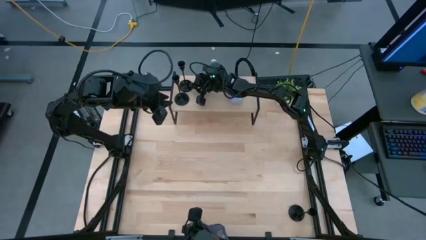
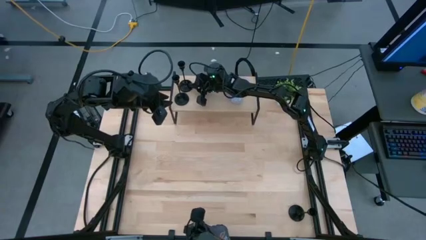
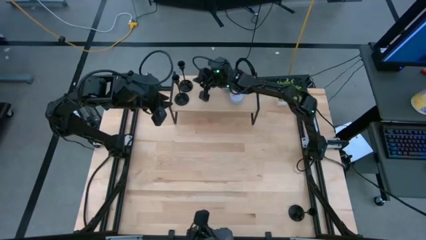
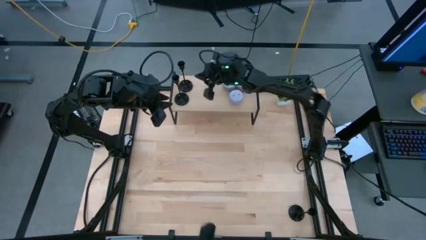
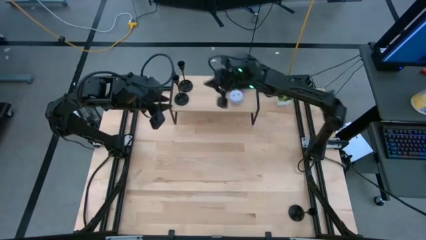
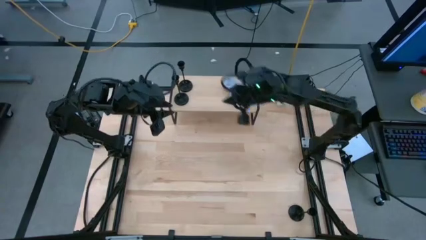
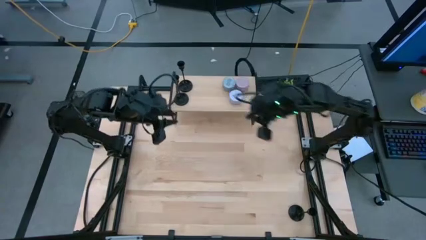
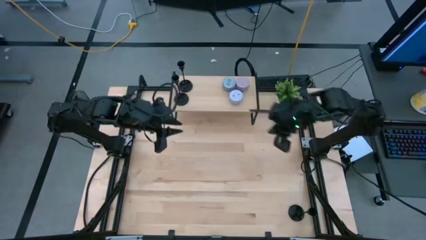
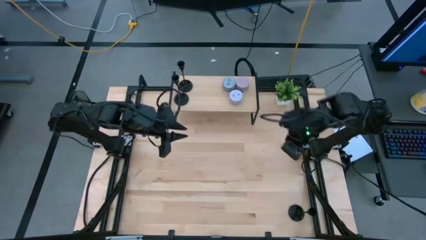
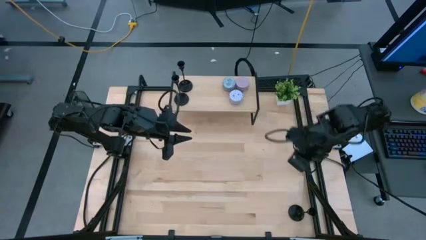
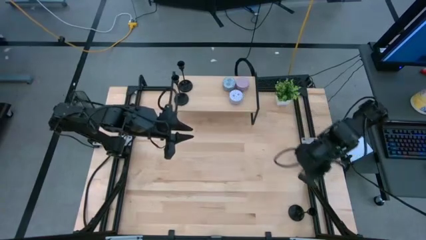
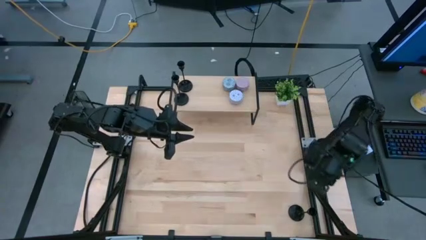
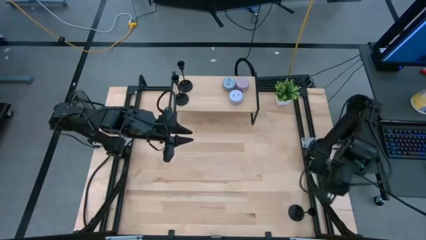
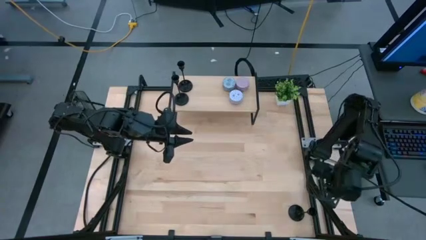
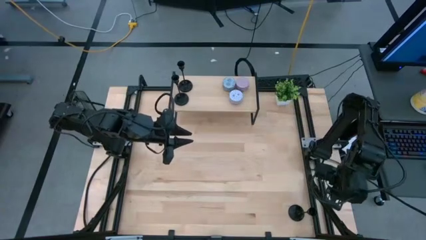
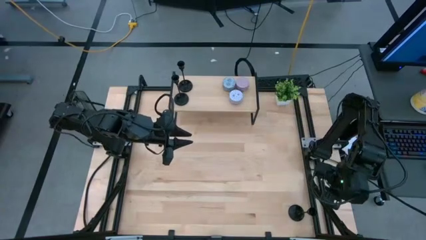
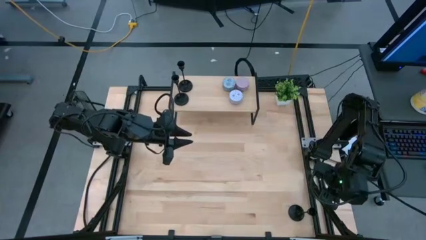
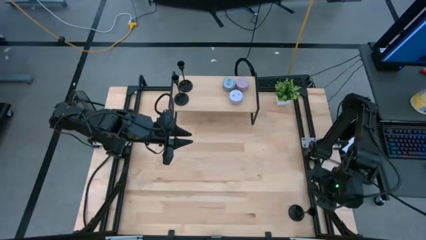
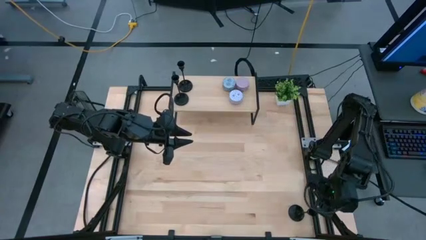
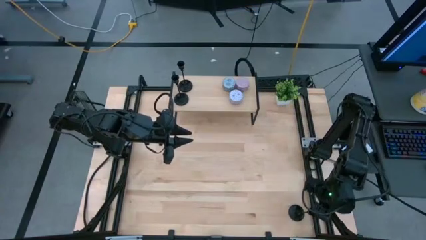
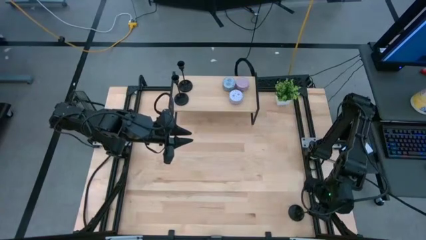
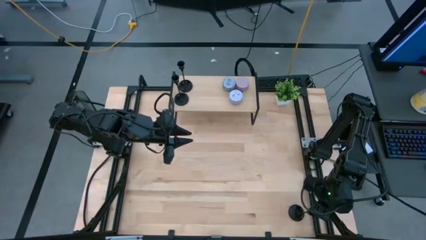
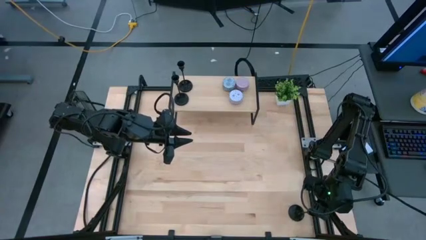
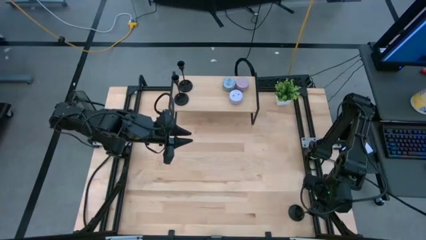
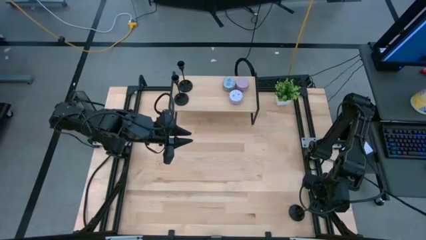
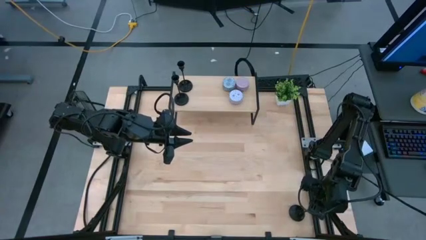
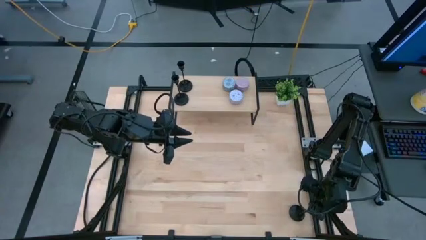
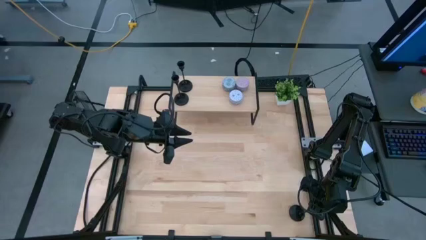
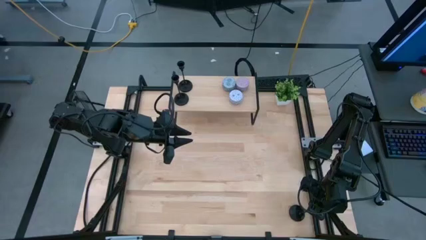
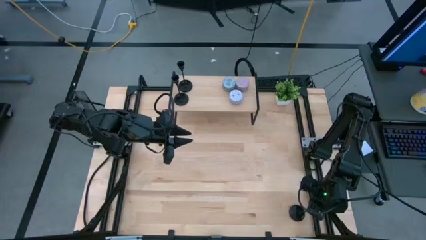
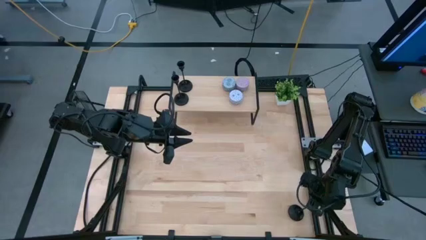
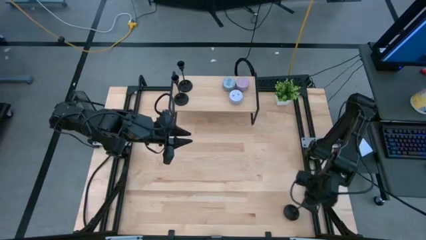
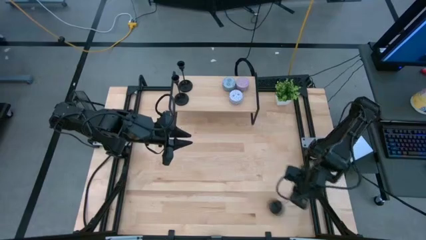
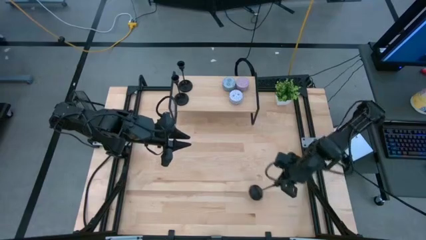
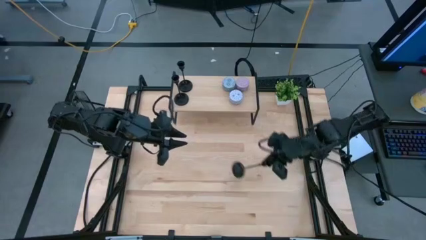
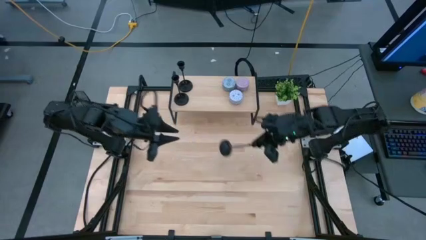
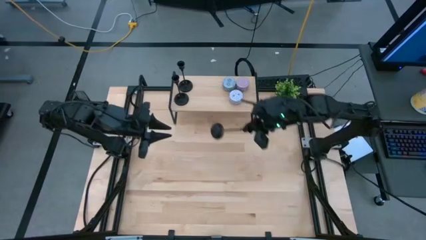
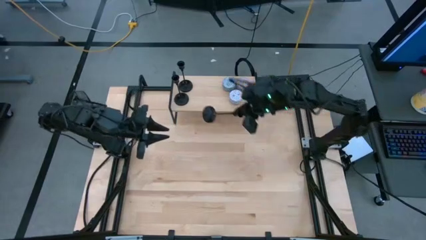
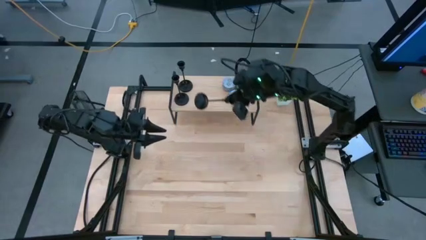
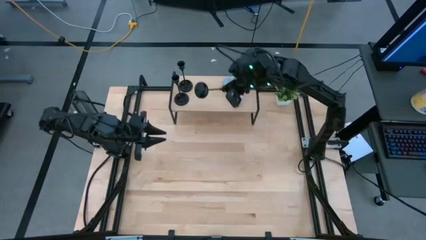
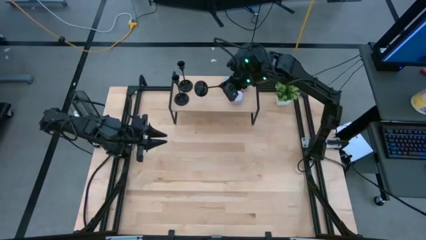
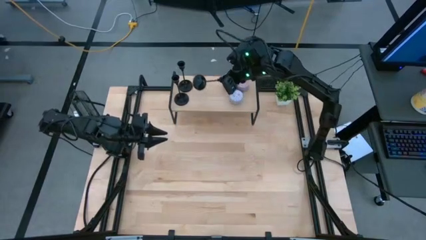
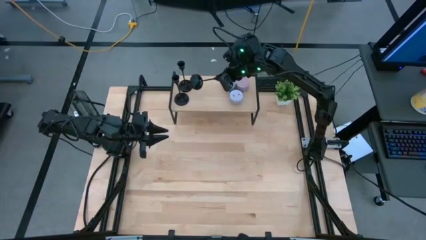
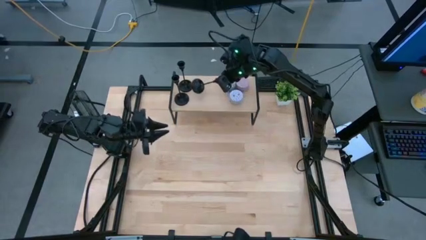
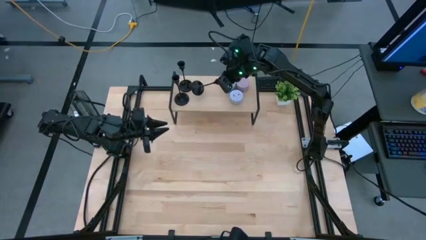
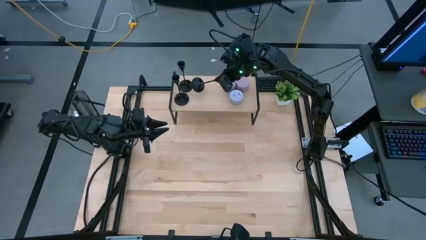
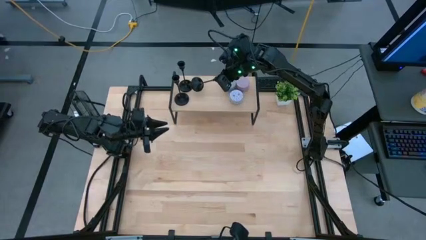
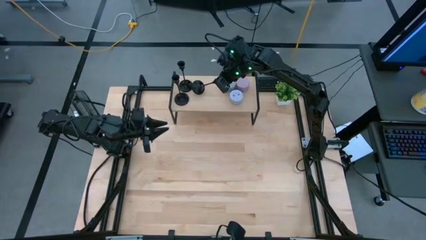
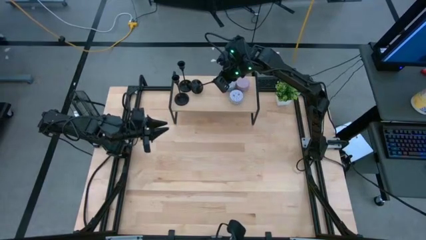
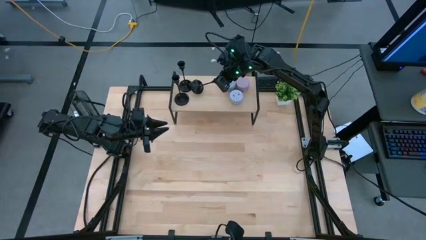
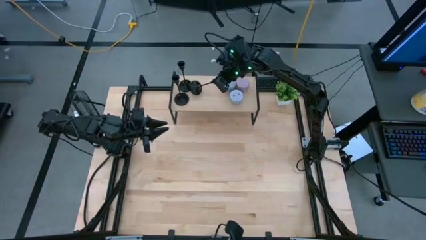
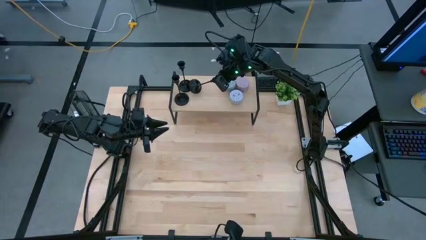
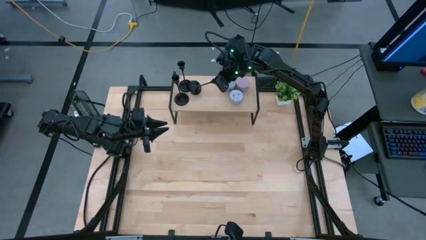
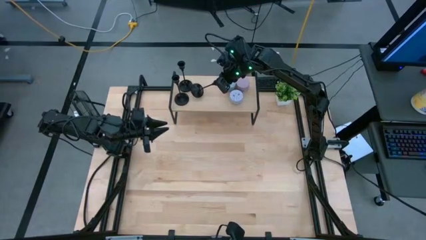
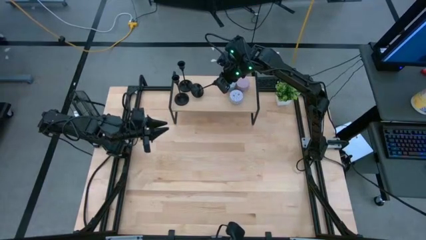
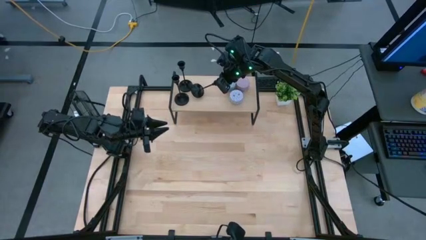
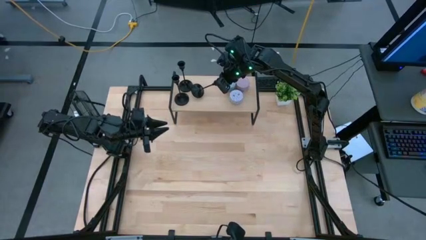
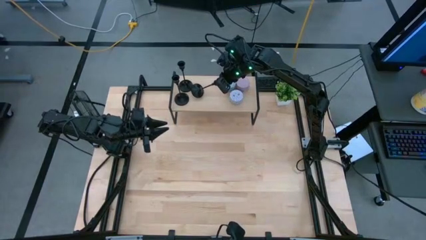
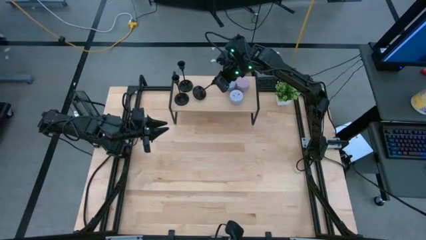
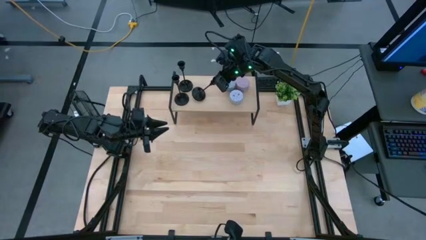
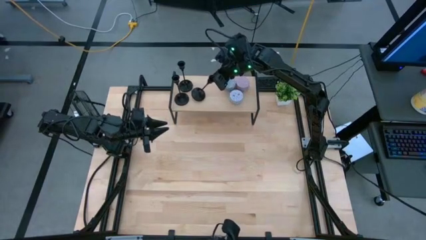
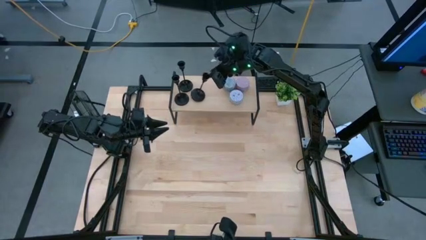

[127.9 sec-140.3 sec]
Task: Pick & Place candle stick holders
Put the black candle holder on the shelf
